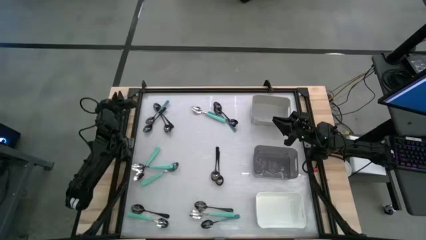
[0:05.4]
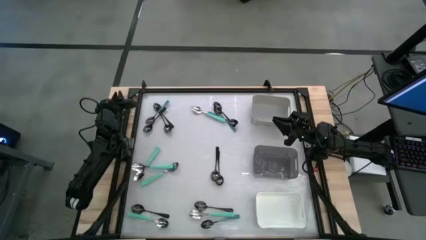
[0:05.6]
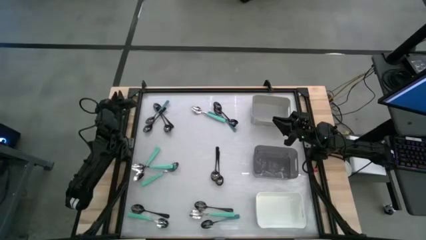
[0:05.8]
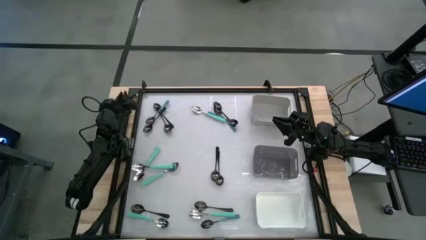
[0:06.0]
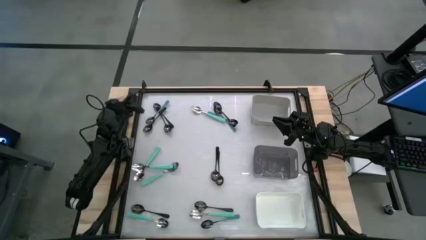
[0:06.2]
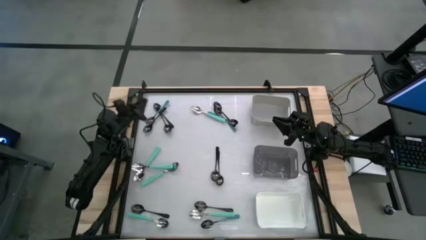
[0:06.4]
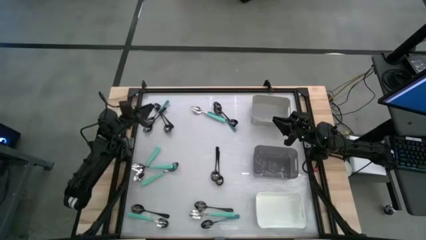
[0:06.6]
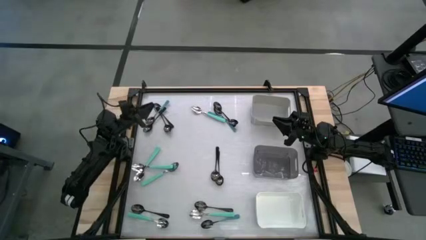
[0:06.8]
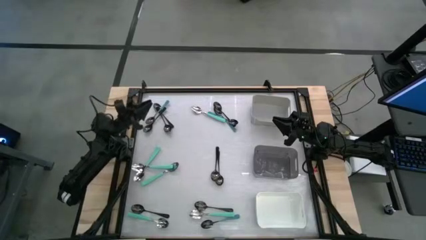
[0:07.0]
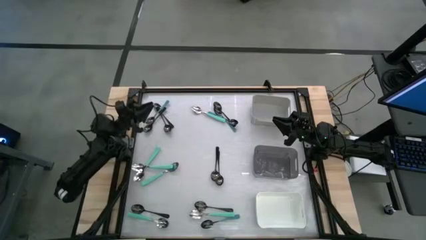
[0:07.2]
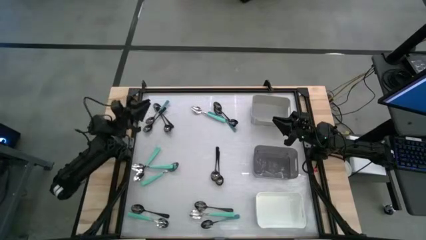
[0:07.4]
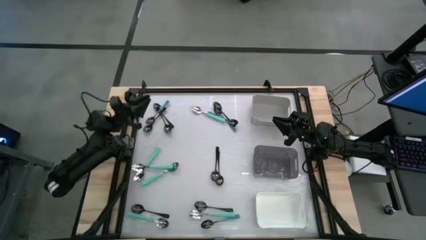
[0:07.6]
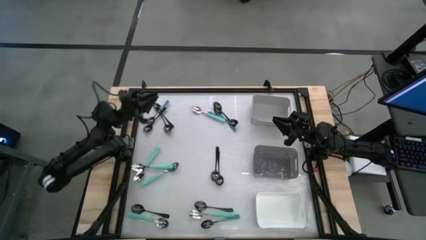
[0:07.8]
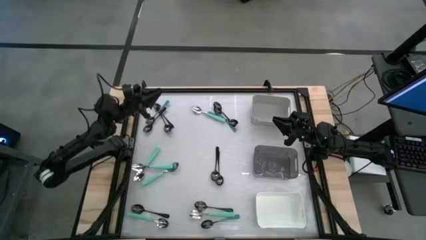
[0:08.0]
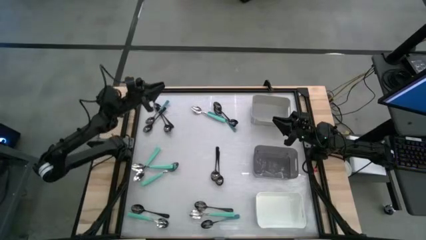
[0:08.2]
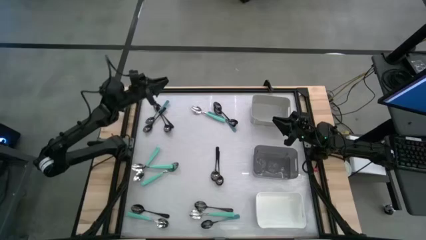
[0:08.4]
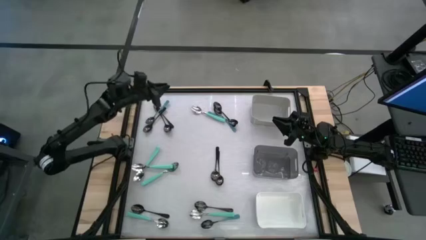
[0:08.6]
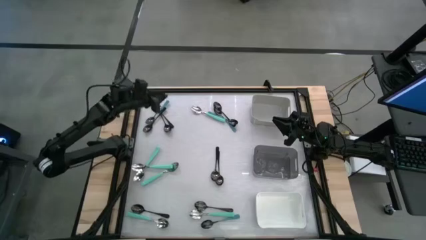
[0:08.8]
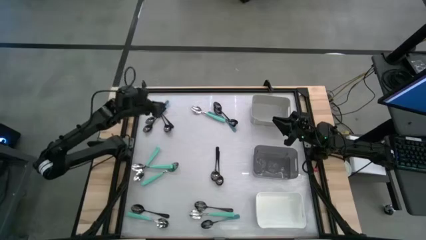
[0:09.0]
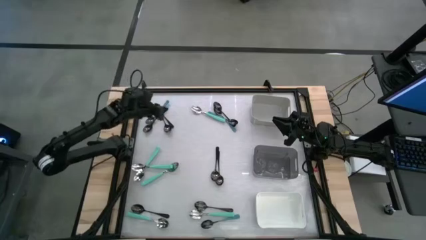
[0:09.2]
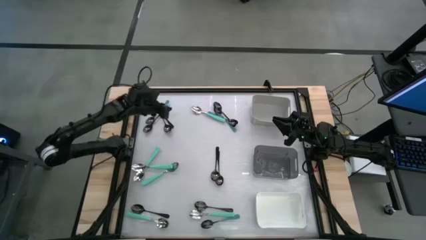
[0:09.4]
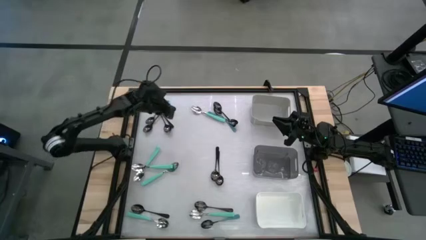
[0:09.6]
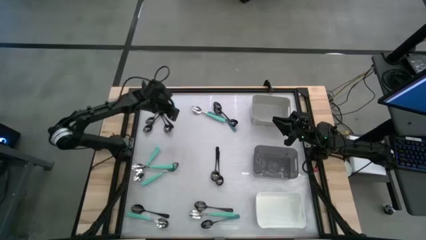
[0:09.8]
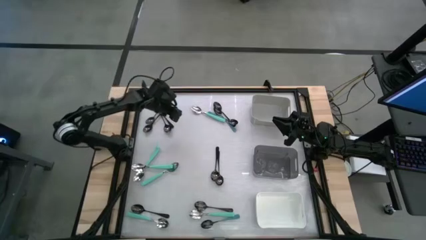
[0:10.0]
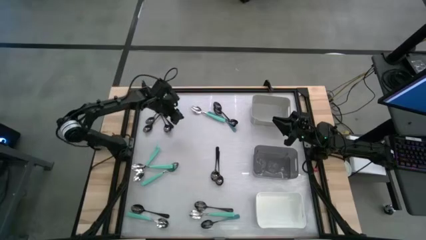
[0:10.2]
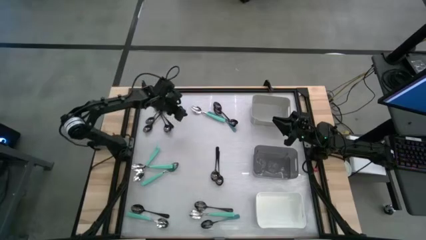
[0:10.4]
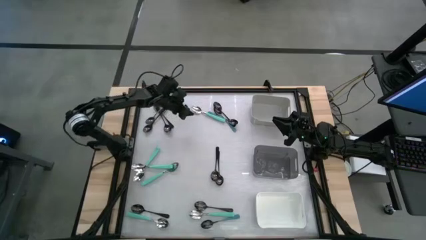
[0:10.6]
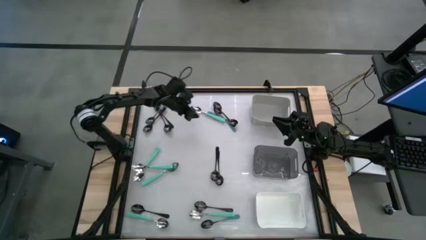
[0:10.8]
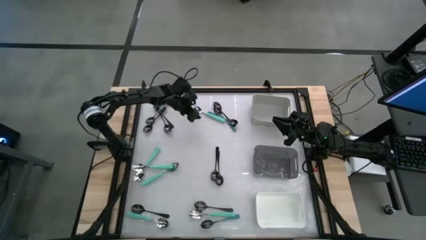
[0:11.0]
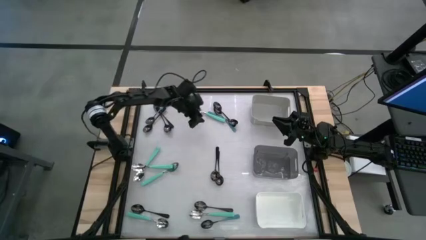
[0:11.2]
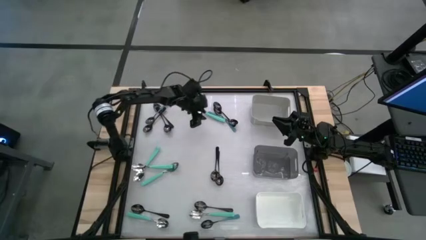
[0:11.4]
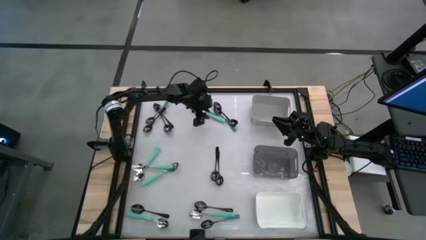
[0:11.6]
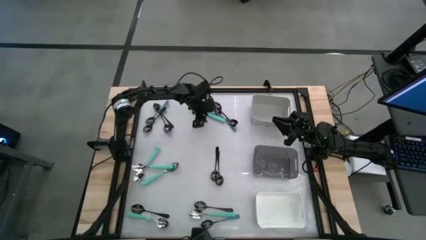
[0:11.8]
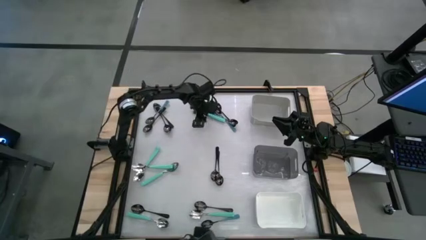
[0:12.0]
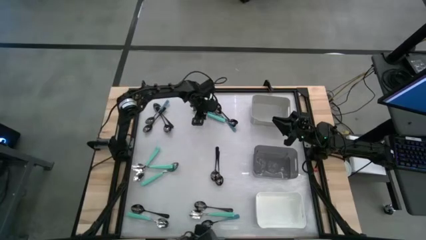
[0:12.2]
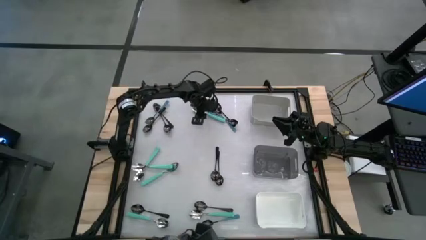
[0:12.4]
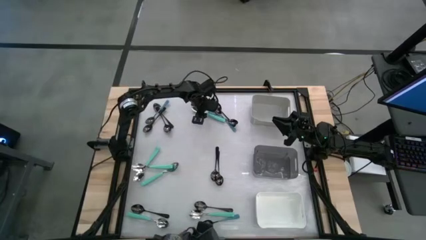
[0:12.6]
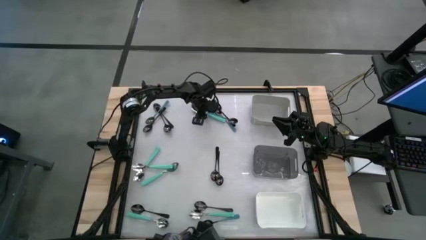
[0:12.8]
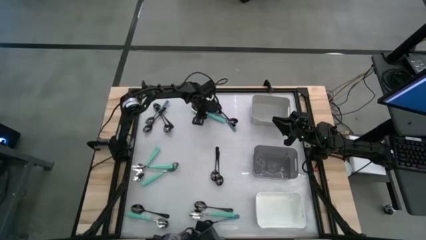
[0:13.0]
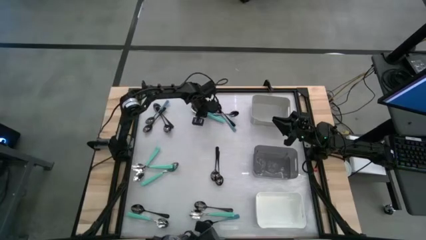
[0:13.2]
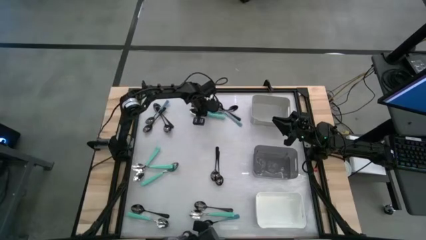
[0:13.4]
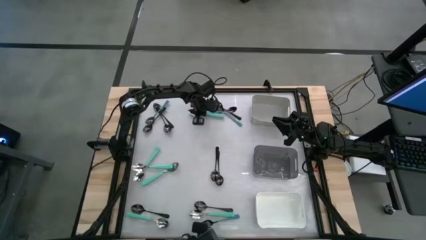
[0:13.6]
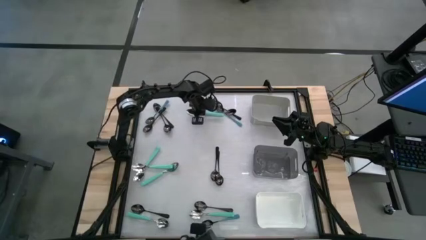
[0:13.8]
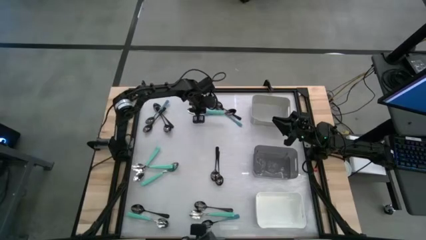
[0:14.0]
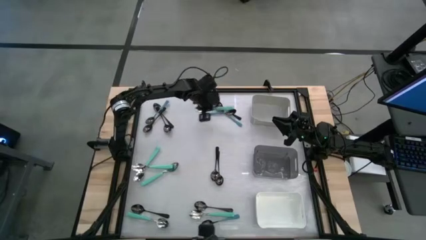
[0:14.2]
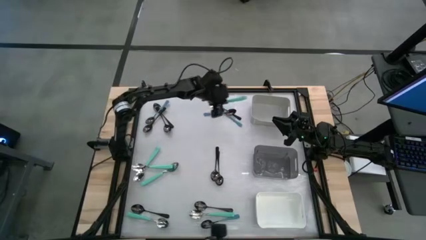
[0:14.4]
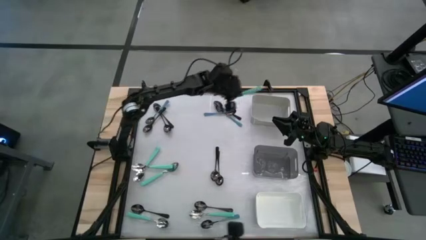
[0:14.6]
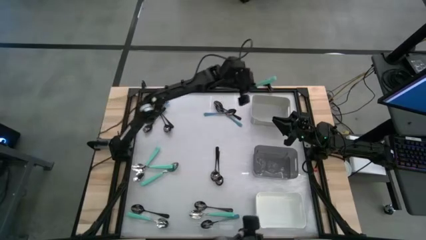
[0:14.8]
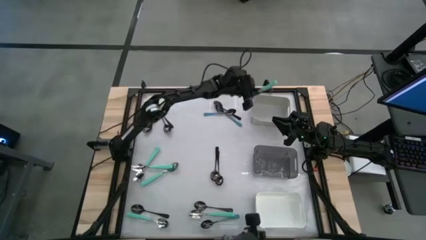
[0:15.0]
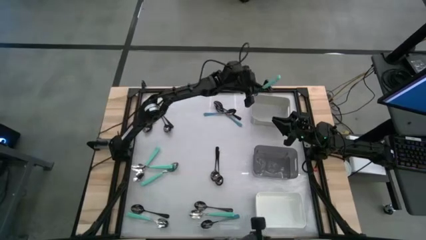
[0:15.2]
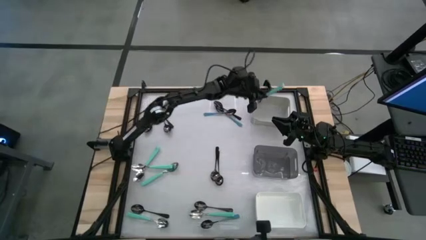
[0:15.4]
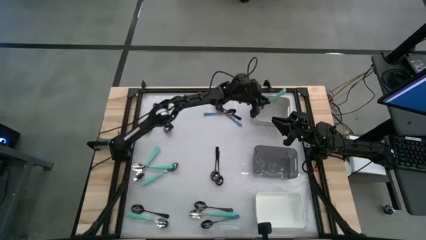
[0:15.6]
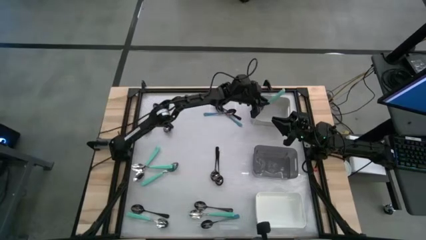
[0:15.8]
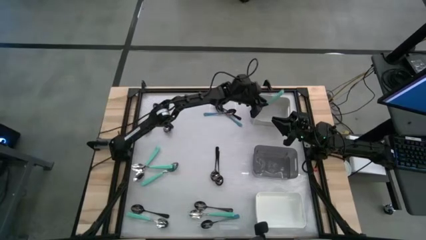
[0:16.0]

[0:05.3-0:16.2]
Task: Sort silverware by color (type)
Put the light blue spoon into the gray bin

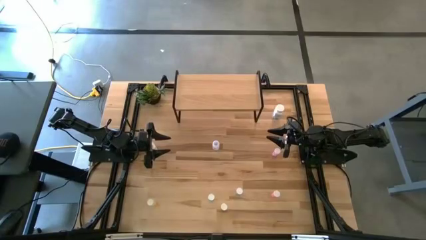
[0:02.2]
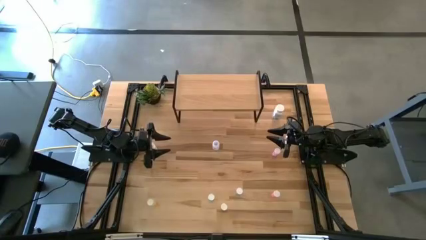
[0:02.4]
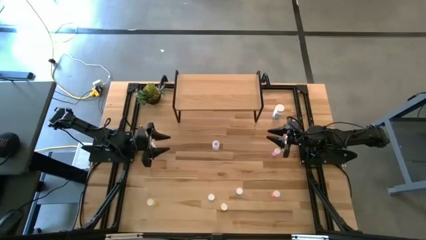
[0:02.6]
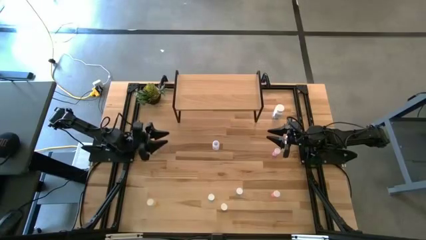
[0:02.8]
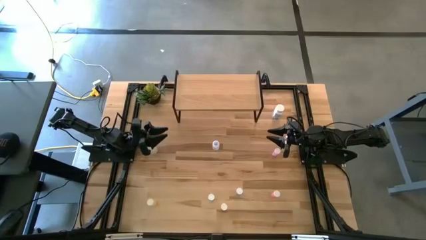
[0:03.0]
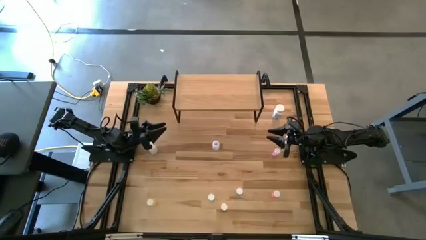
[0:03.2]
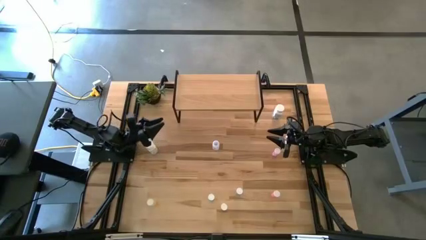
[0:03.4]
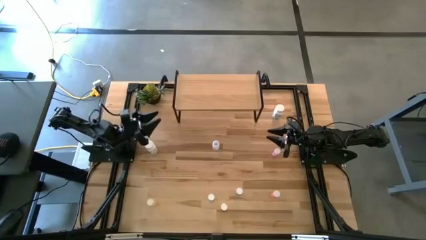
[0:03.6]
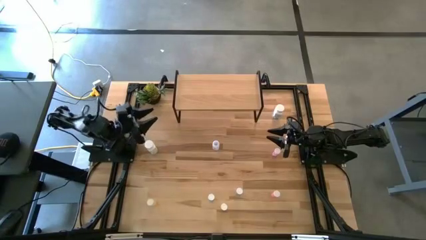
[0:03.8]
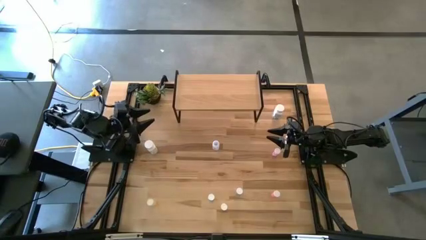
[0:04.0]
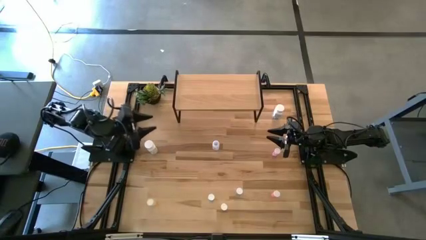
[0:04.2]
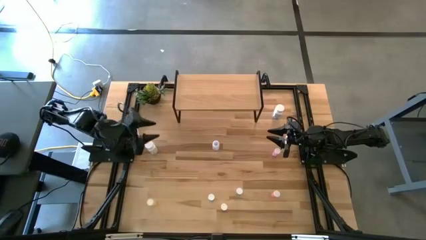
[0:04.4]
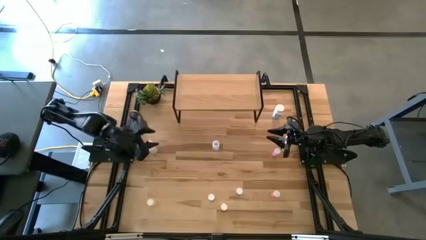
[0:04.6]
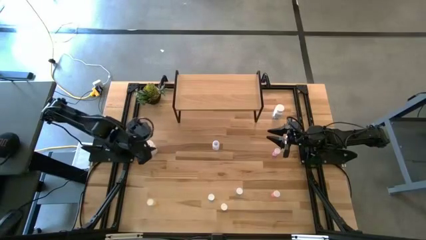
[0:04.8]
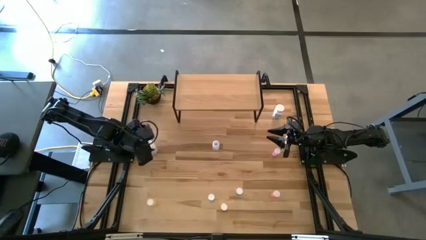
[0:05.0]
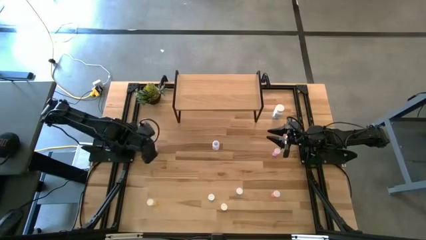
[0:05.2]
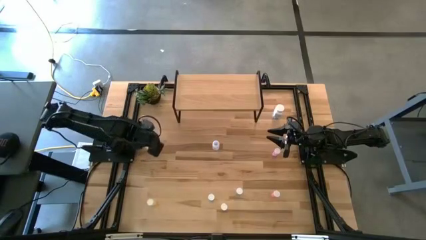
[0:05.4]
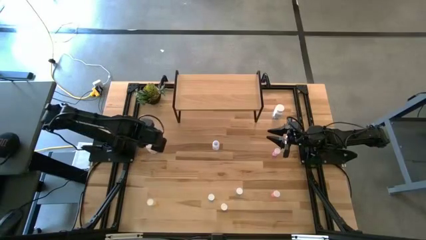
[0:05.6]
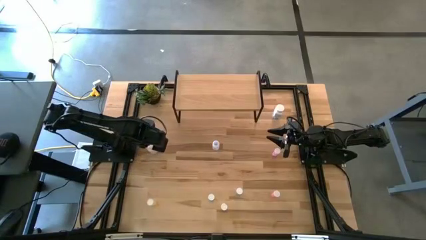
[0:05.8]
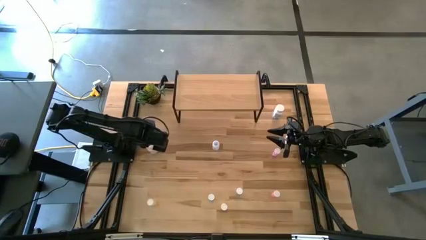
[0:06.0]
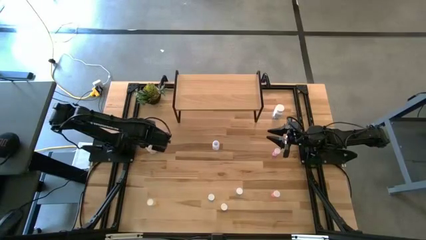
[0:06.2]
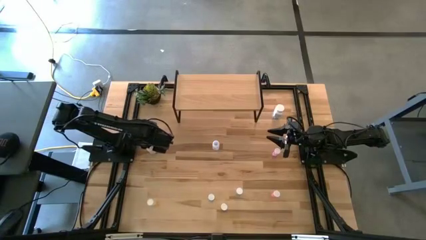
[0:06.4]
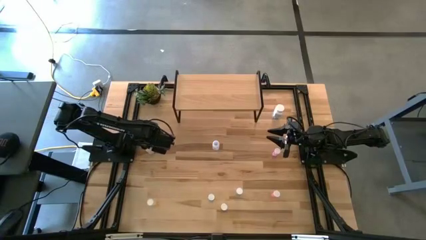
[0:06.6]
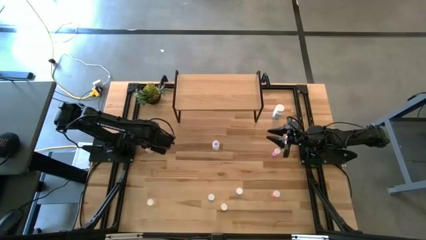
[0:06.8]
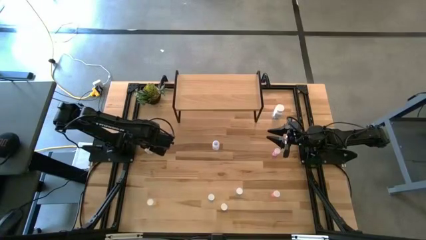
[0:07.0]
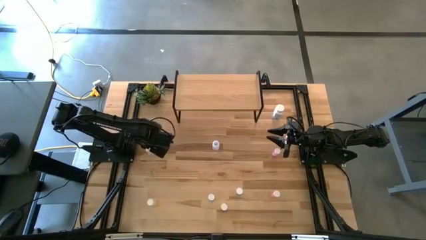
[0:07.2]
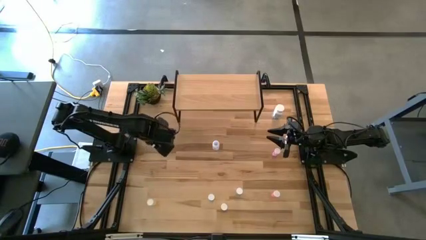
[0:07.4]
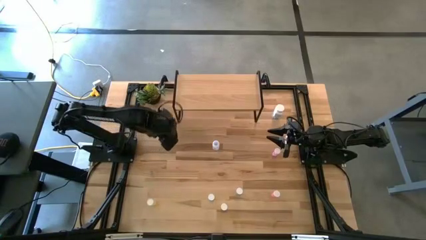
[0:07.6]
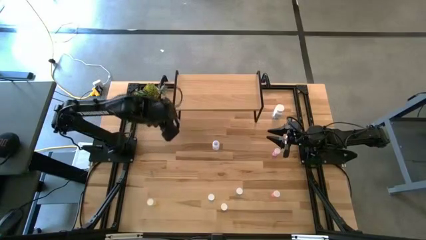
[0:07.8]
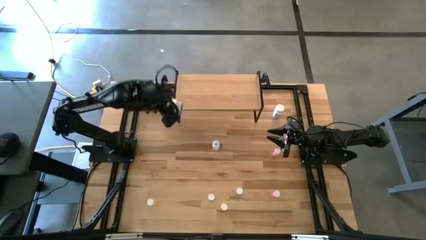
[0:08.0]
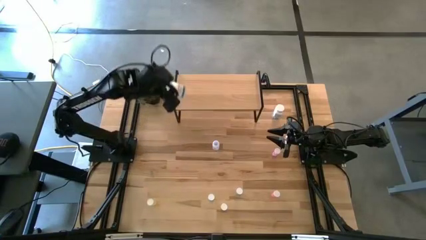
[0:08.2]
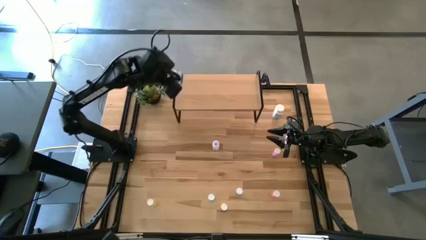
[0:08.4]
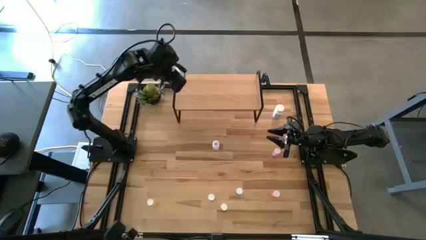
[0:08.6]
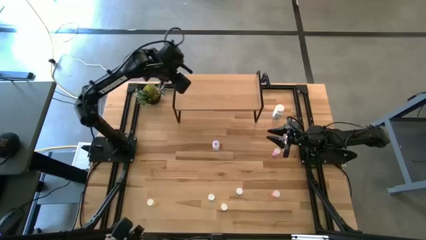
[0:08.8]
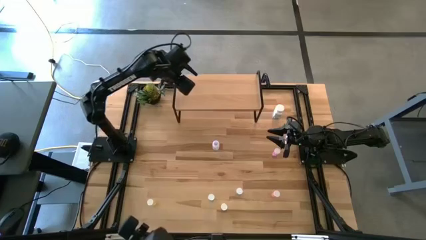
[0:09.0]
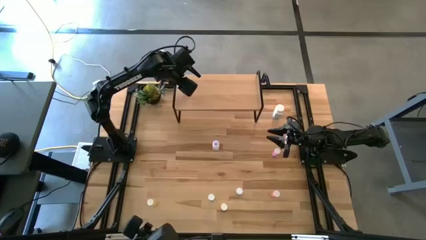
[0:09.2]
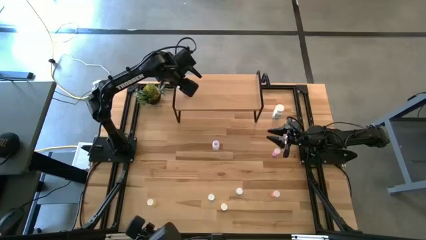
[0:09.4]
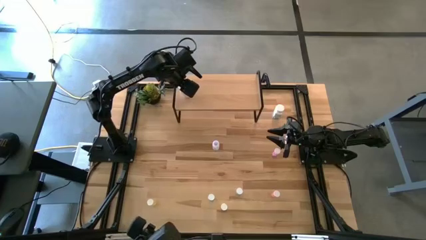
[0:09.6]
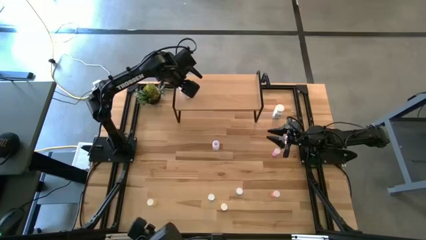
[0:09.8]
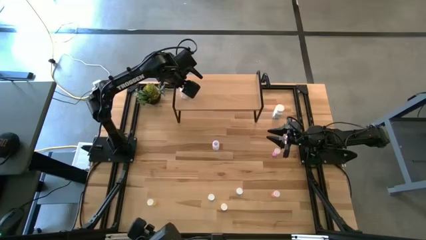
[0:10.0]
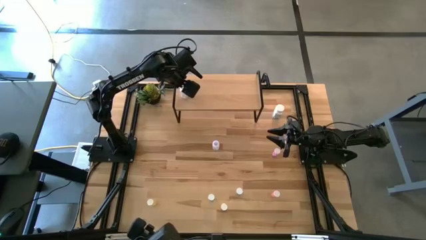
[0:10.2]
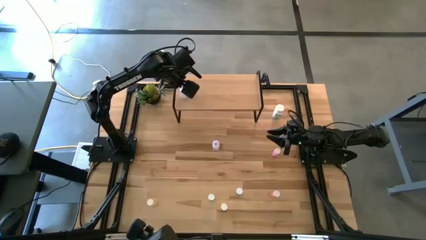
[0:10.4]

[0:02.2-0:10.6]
Task: Pick and place medicine bottles onto shelf by color
Put the left white pill bottle on the shelf
